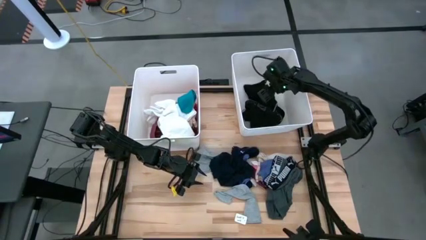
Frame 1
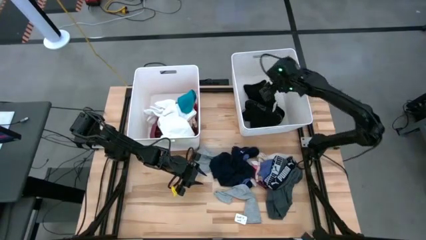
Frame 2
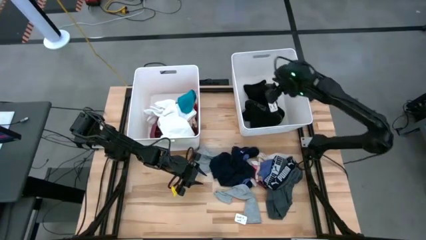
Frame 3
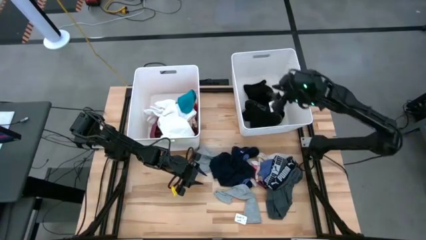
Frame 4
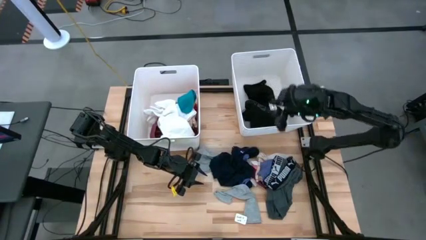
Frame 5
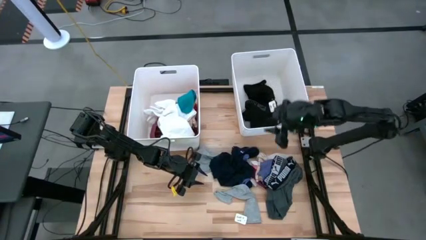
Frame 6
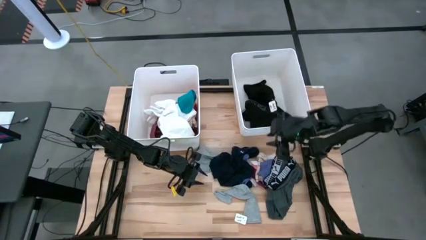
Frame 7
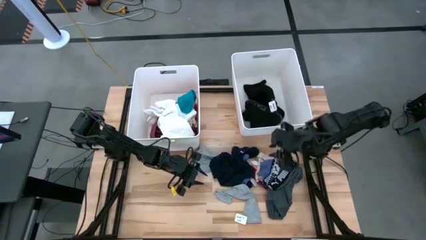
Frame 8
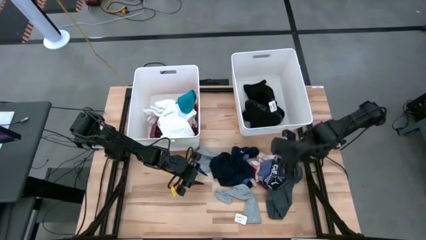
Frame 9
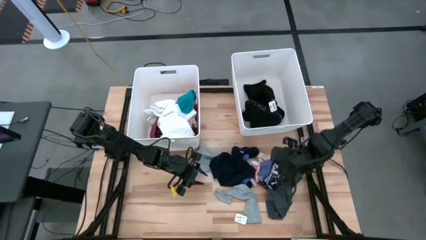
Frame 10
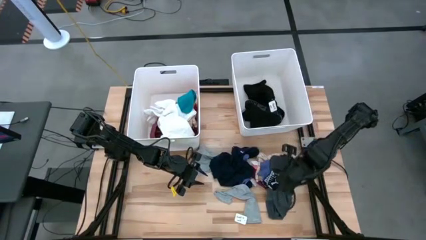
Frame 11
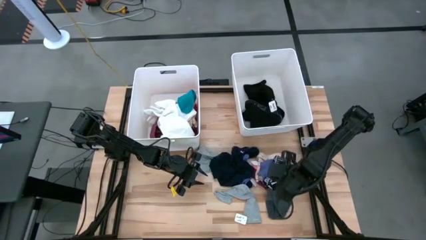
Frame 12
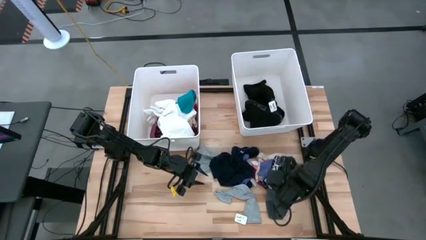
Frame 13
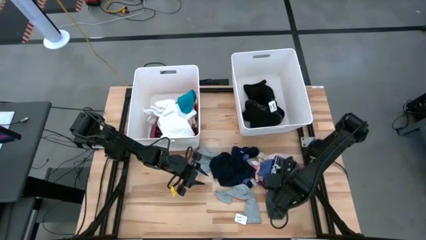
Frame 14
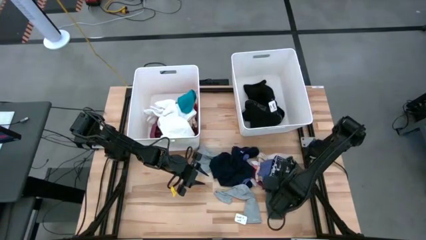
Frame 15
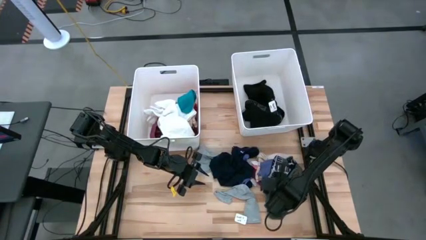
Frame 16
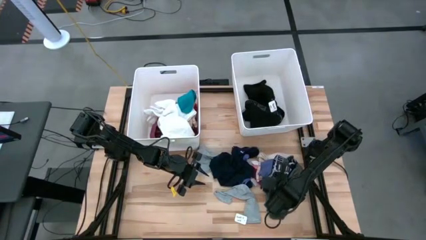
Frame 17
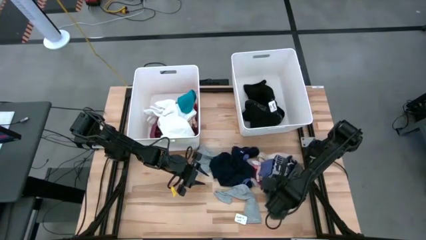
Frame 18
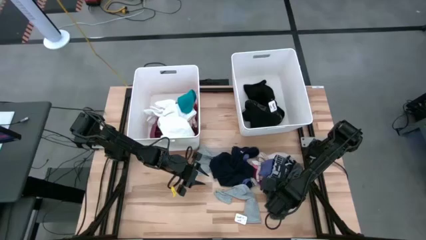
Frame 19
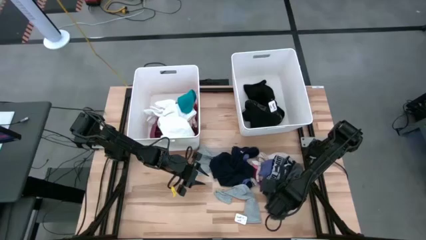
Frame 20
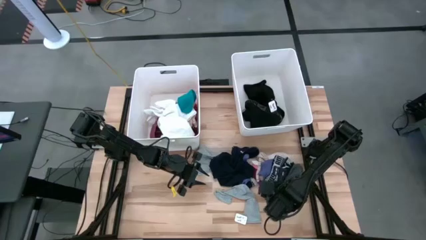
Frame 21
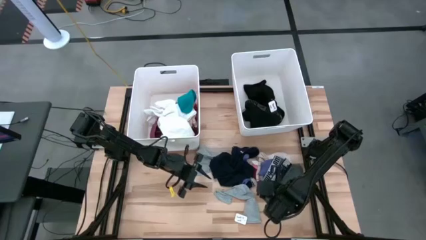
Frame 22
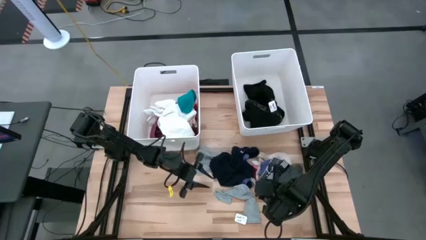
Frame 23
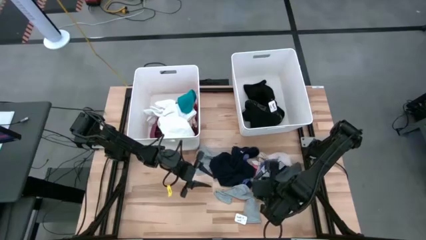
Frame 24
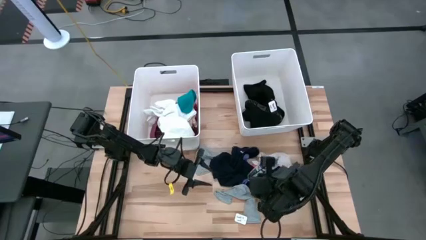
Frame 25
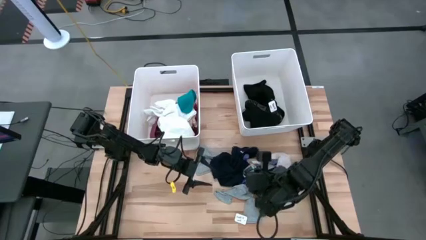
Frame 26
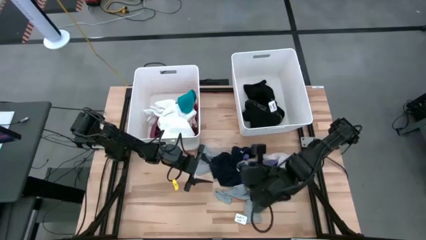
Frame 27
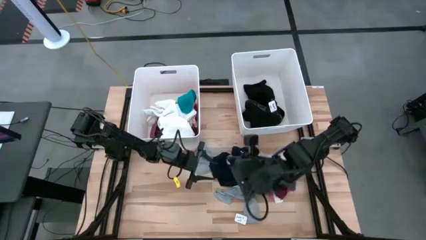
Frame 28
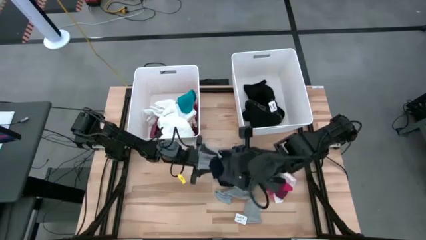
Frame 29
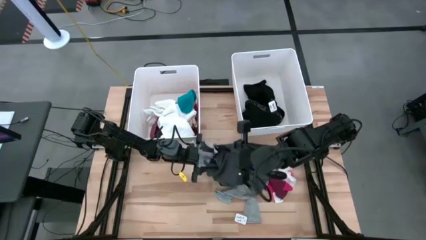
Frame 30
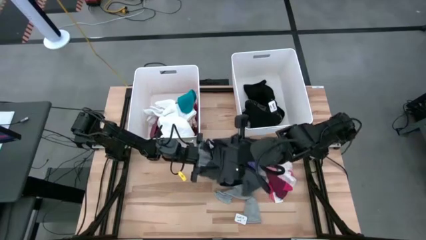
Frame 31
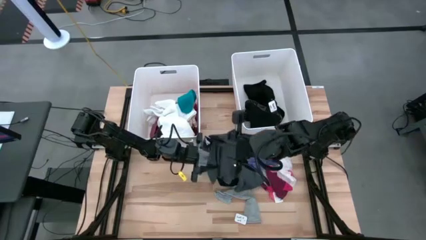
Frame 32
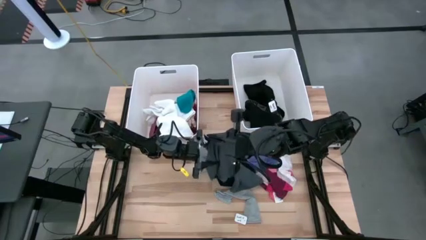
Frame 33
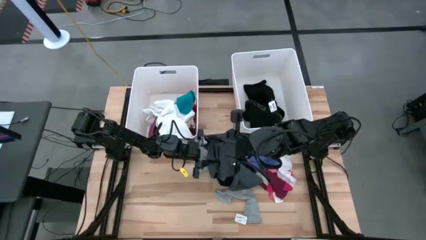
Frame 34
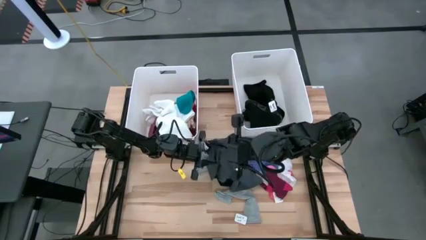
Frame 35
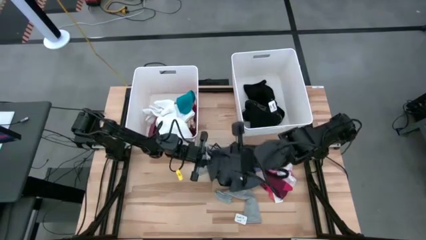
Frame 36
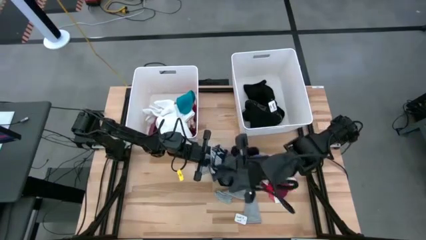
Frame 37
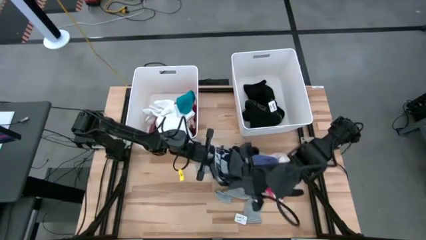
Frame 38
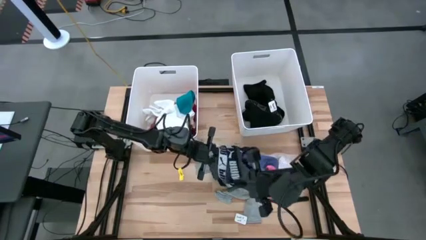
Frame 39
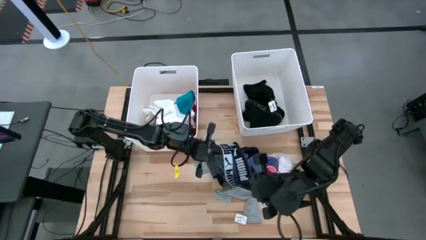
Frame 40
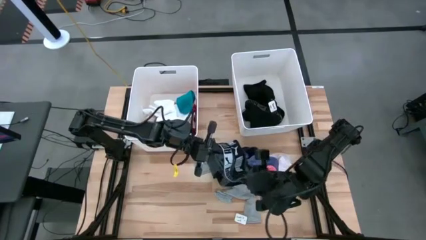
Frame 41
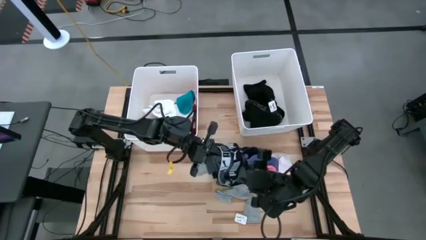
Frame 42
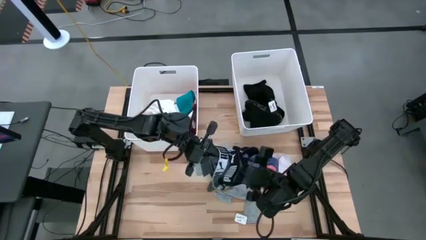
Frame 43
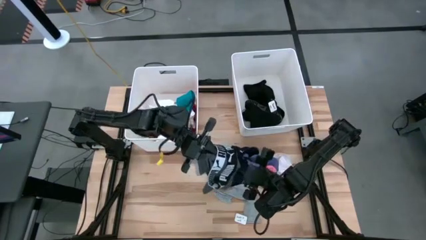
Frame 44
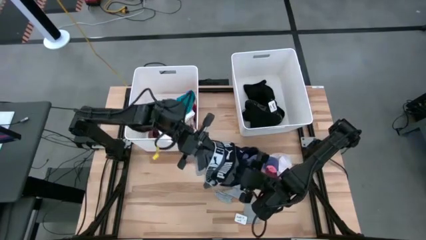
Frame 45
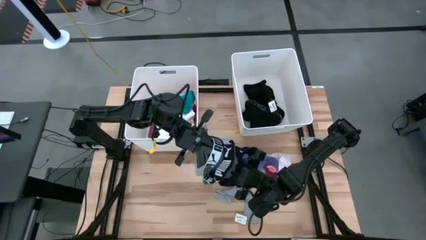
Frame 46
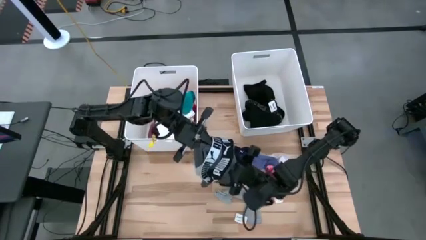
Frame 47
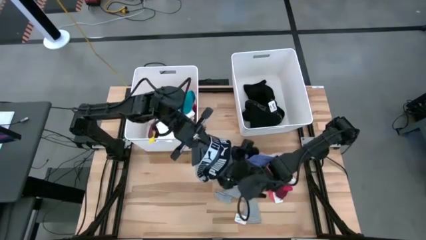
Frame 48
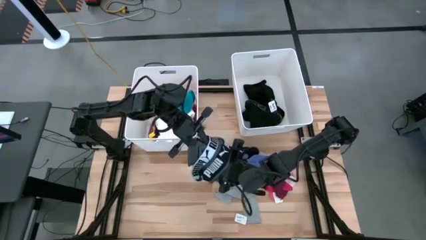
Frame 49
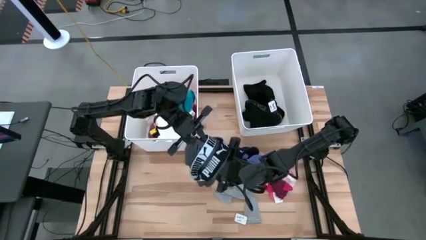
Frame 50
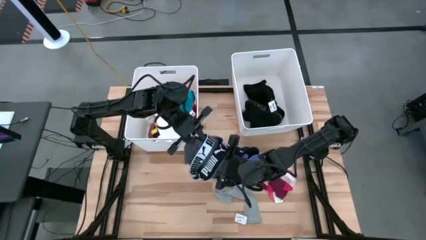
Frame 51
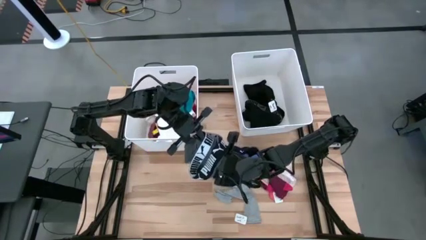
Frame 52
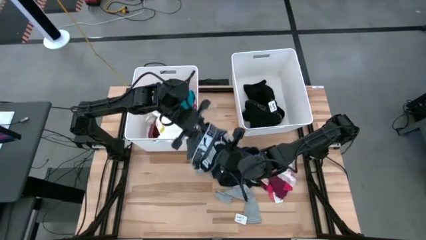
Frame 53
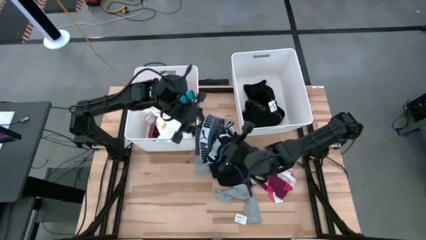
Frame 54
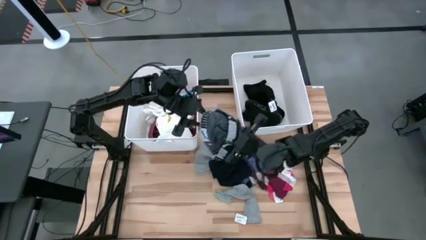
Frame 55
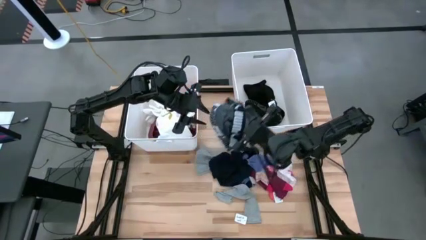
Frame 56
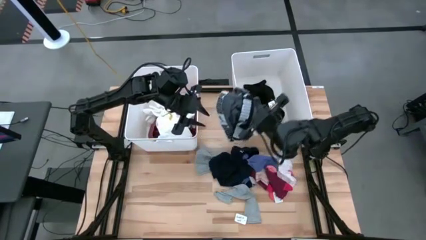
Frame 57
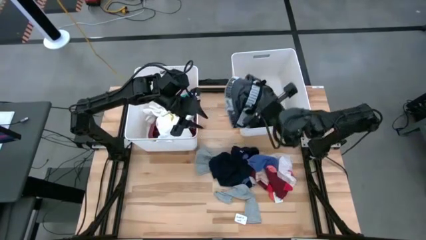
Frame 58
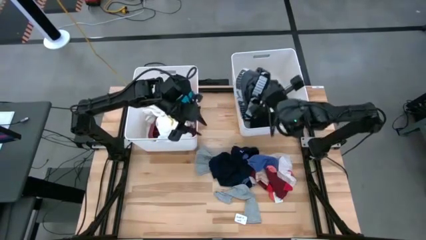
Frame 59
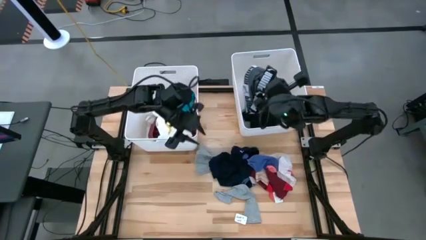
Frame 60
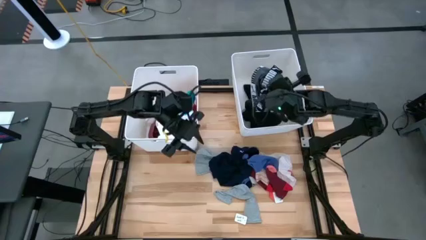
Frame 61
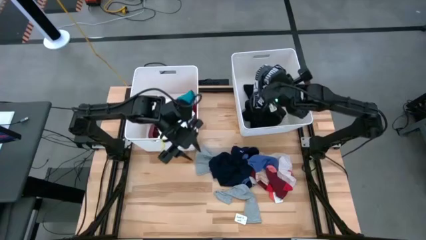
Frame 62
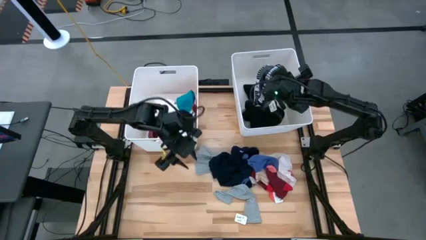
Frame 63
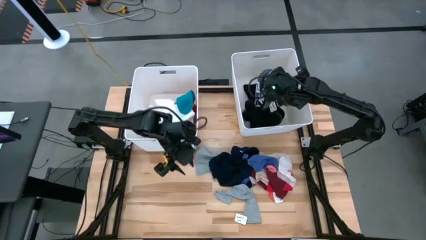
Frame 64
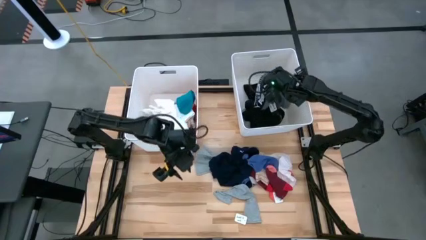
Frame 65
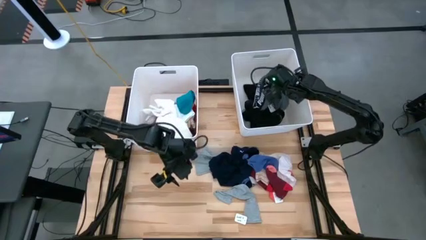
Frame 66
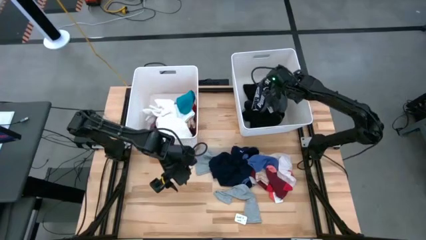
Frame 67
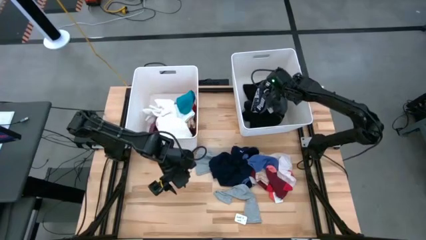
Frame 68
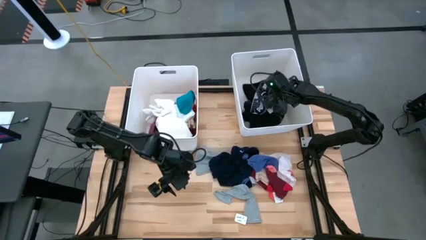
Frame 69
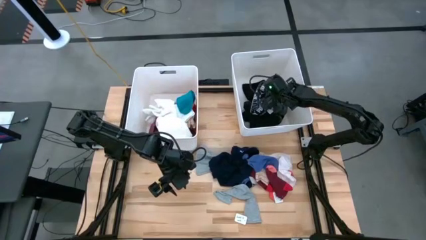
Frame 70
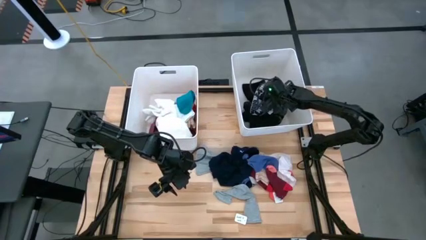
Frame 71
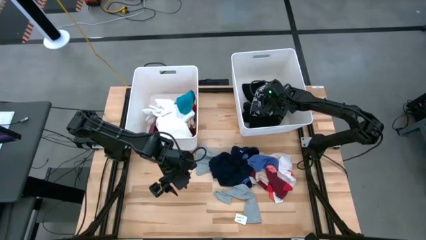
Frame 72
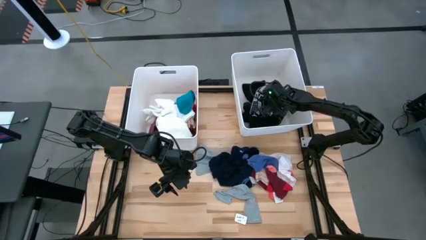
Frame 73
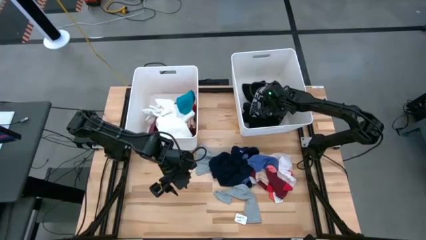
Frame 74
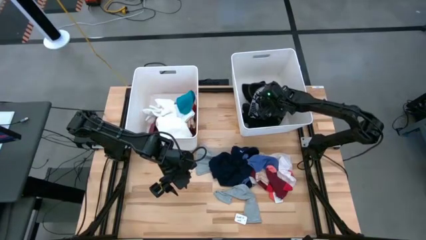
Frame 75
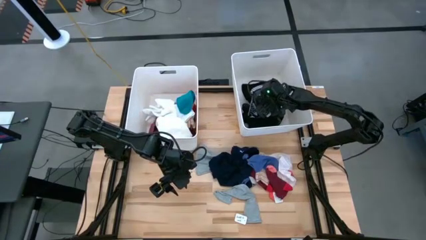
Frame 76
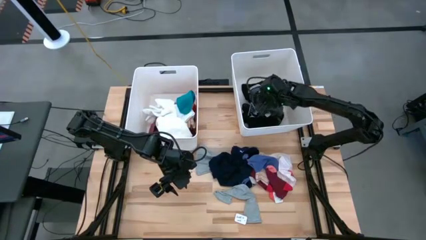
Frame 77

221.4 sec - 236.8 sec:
Task: Sort clothes
Put the gray underwear into the right white bin
